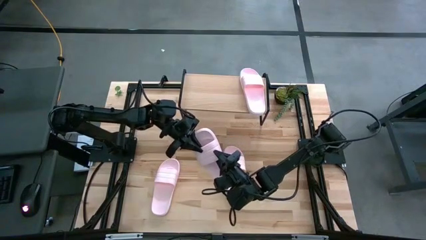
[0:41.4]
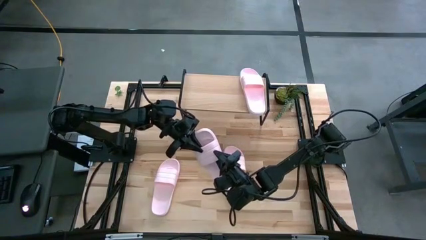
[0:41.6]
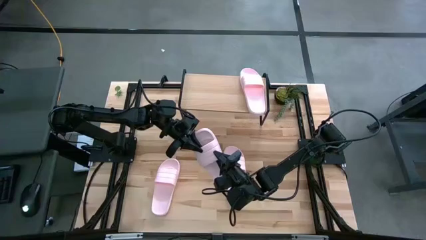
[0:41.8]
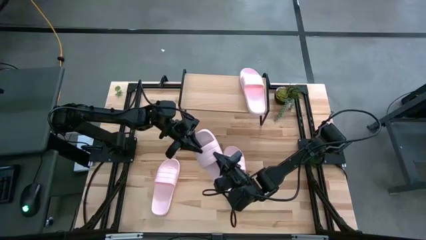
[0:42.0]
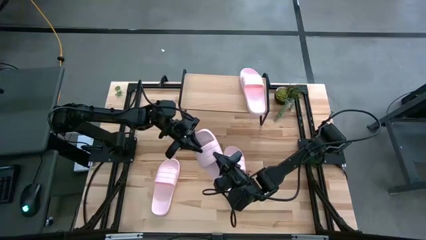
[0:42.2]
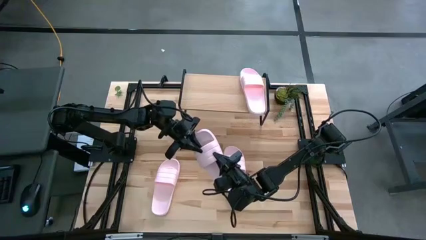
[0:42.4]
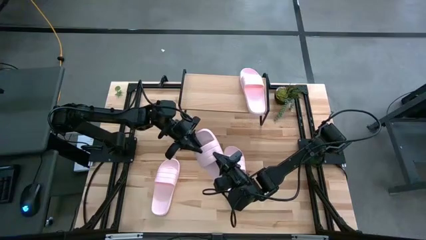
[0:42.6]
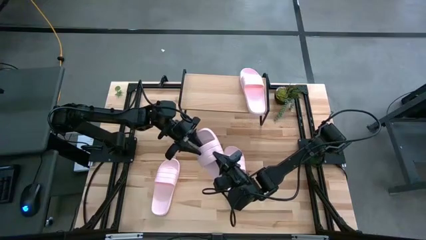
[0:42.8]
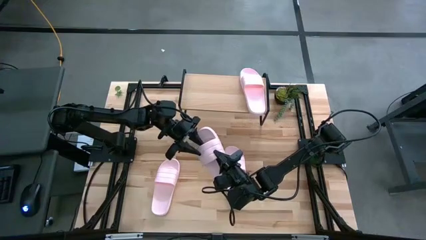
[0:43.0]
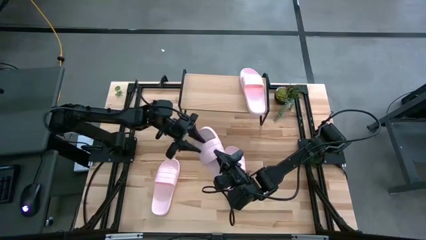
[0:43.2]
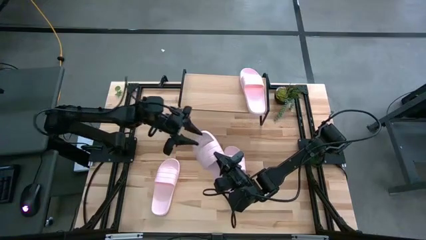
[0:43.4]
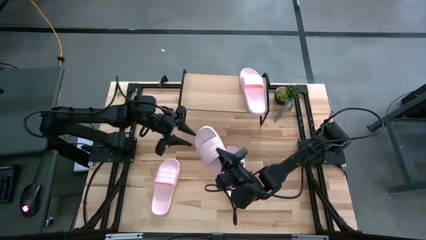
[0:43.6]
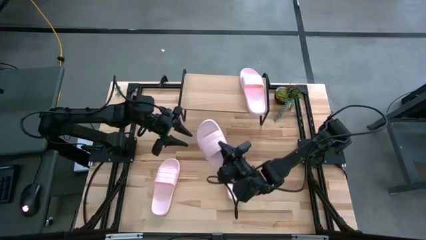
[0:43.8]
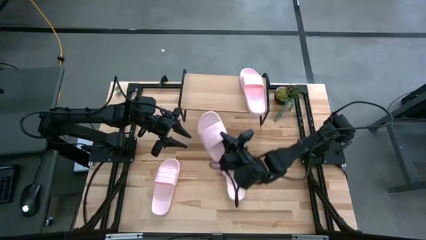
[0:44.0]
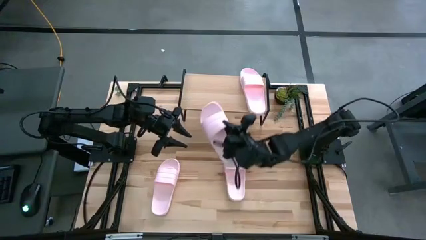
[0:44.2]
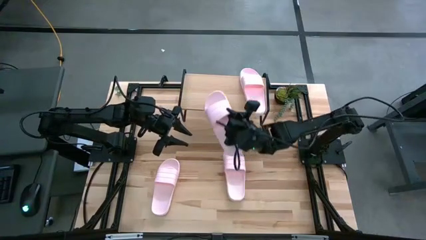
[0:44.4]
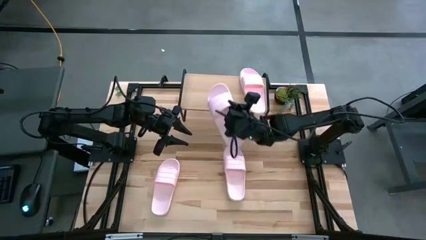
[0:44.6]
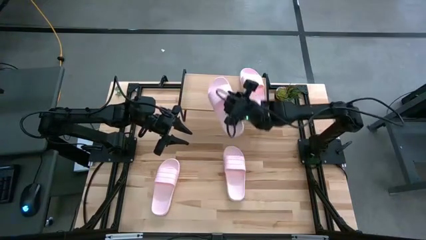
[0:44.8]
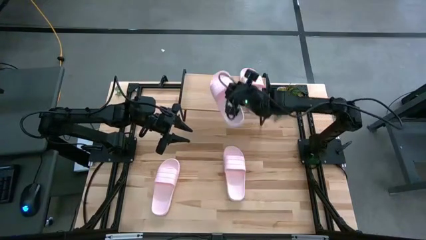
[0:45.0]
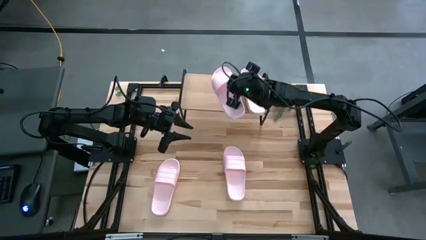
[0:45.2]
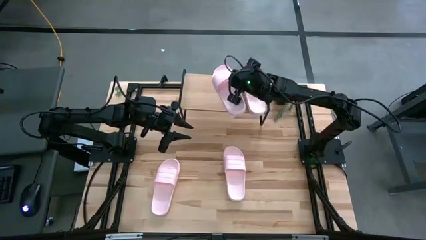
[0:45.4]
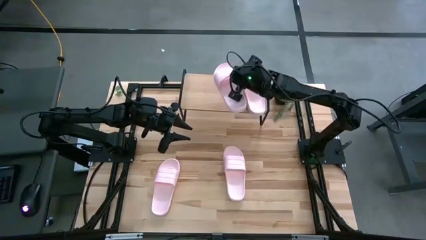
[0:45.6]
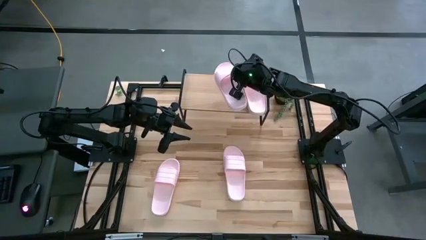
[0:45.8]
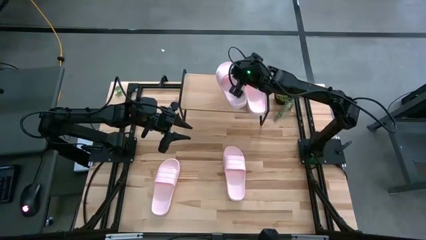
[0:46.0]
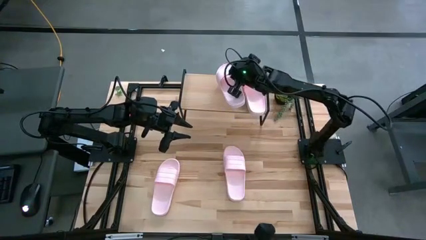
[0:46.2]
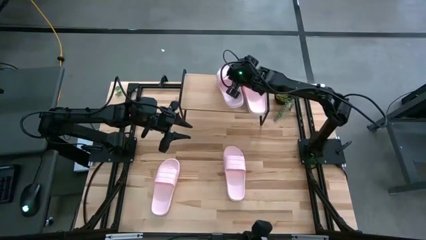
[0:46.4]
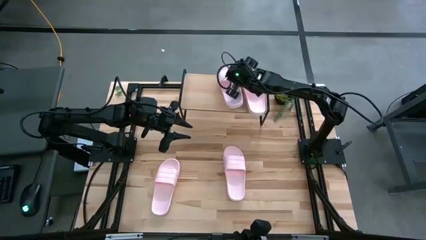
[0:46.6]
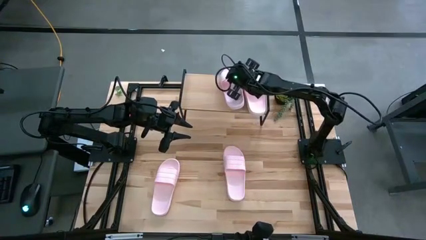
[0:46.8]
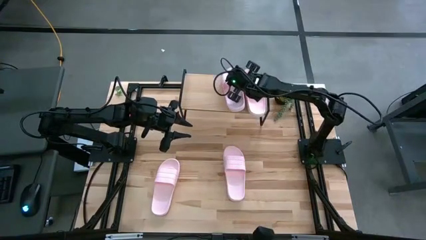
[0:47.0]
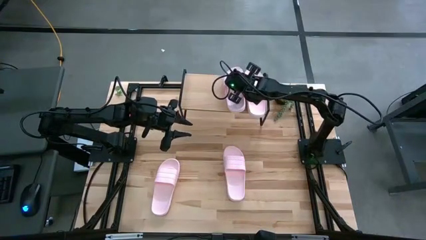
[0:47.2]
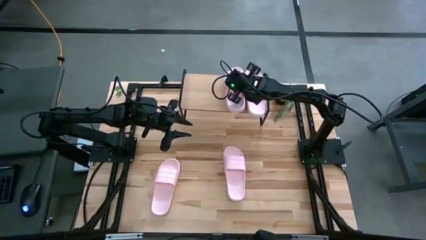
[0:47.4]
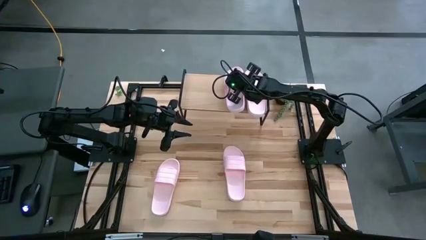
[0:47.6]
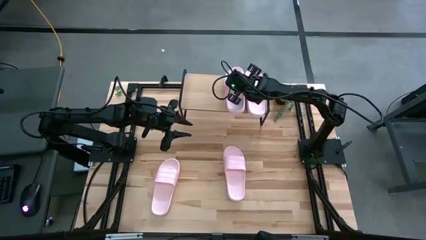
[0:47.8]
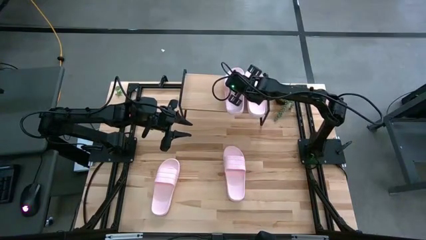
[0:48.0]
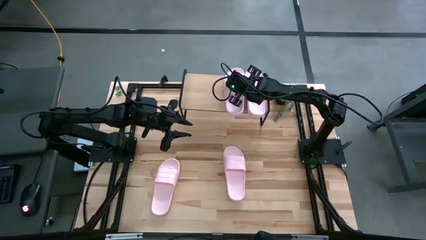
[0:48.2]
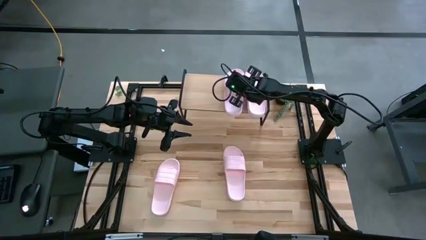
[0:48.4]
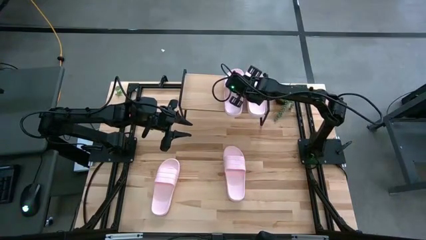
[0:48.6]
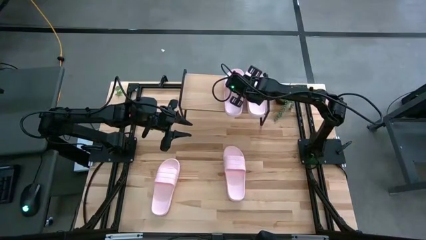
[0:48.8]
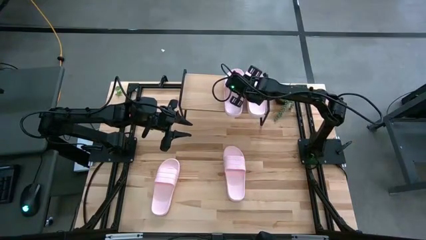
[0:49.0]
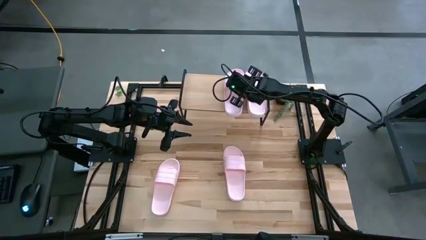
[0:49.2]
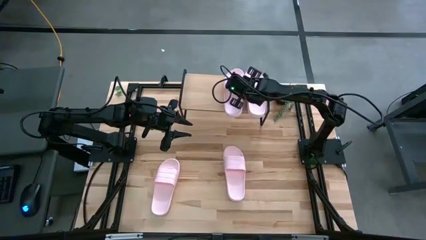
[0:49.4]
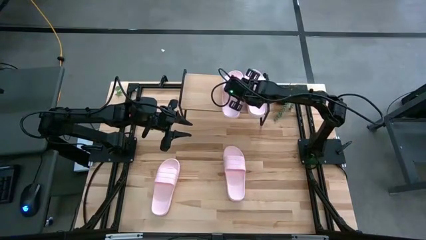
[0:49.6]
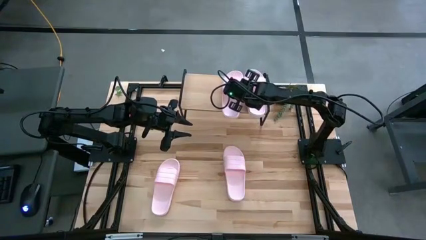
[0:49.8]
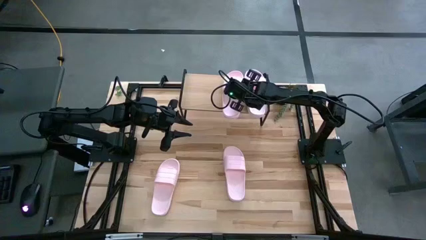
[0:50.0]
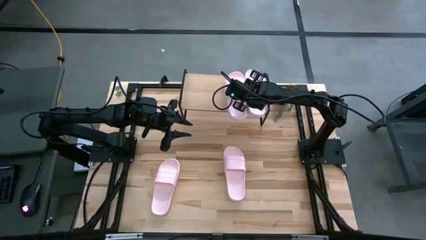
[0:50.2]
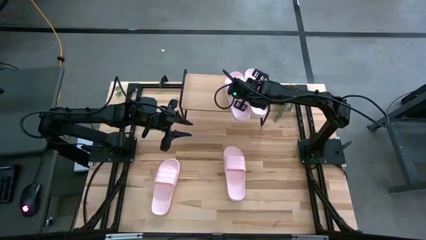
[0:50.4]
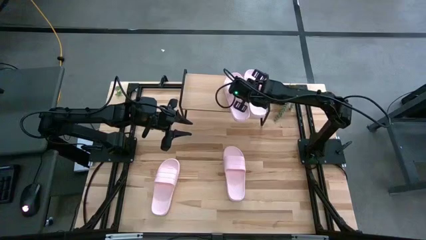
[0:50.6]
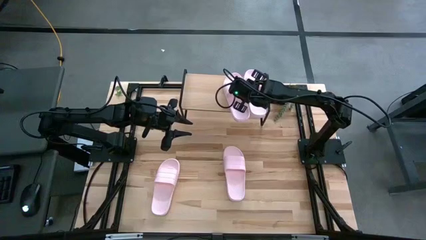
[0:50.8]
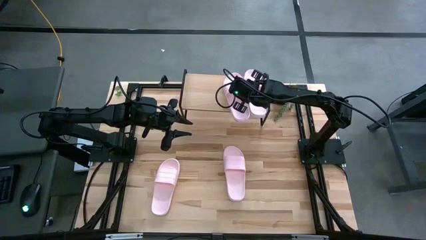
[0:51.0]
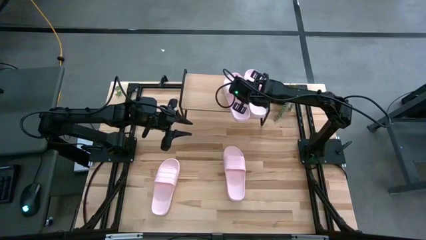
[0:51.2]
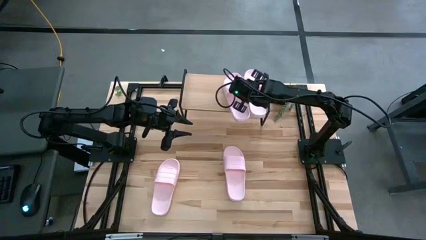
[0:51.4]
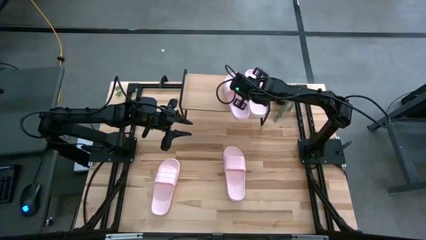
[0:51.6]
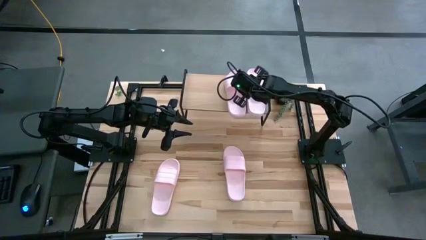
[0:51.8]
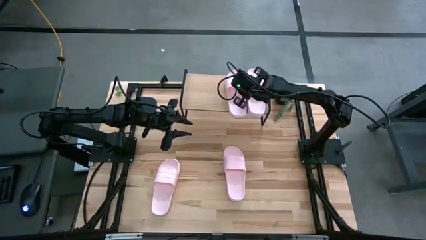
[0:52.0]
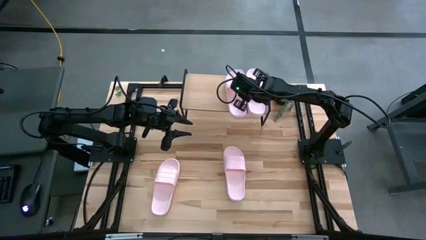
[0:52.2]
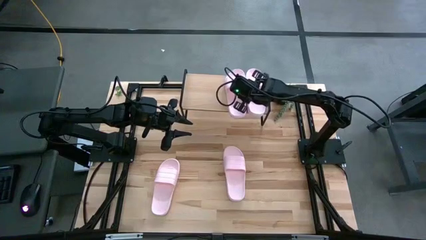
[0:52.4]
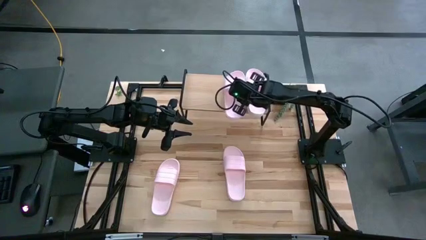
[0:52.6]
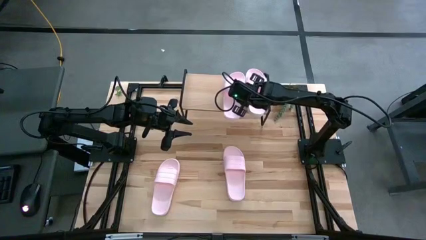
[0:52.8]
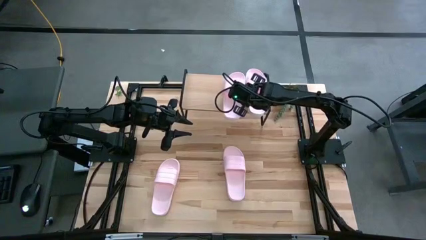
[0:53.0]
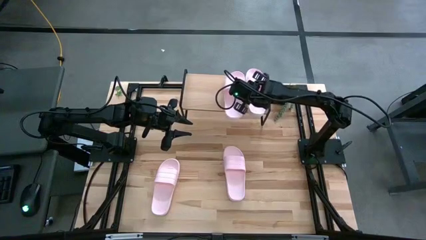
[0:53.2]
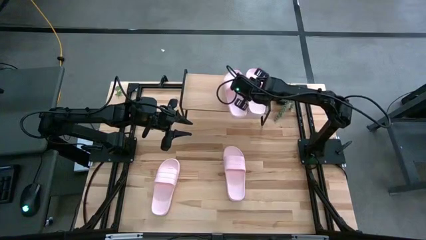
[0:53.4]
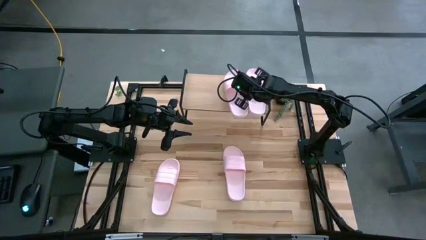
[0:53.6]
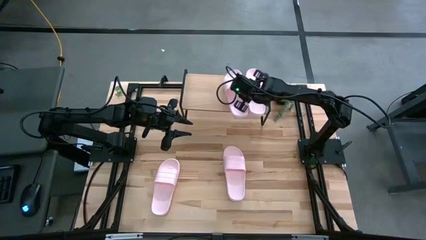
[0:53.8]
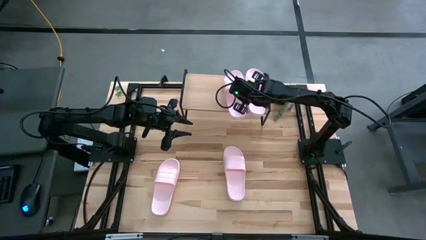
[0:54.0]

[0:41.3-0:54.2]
Task: Pick and place slides into the shelf
Put the pink slide on the shelf
